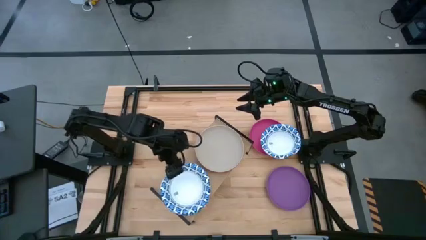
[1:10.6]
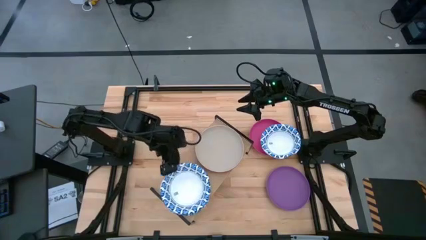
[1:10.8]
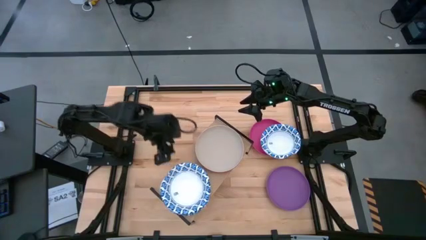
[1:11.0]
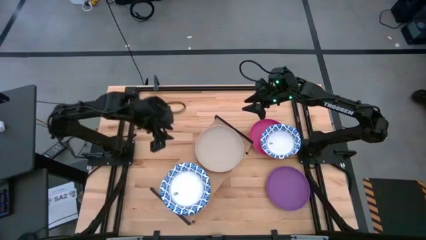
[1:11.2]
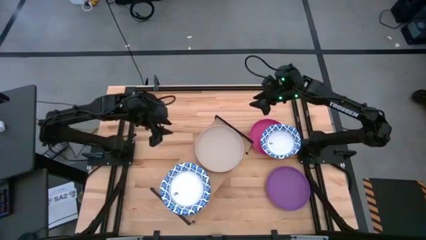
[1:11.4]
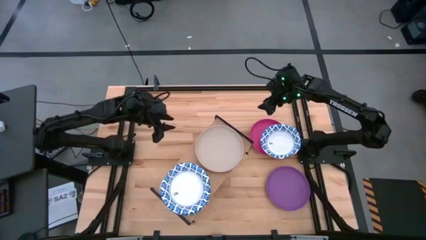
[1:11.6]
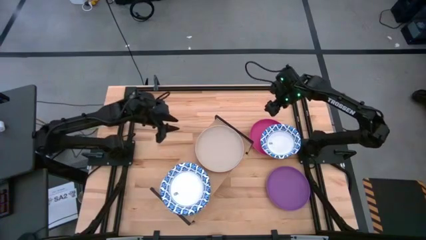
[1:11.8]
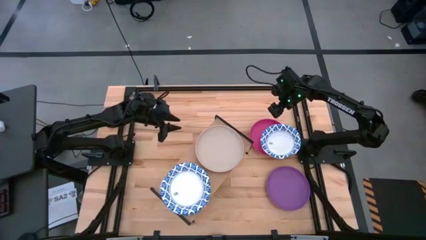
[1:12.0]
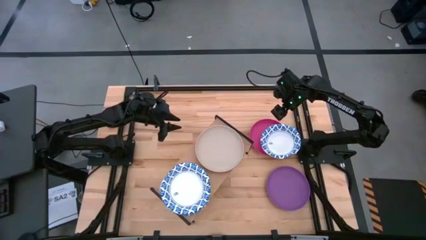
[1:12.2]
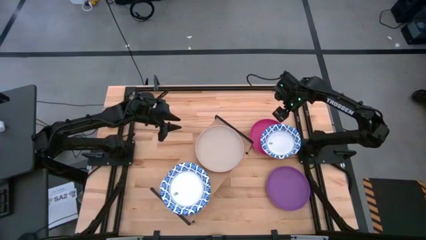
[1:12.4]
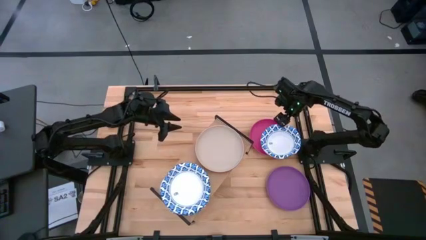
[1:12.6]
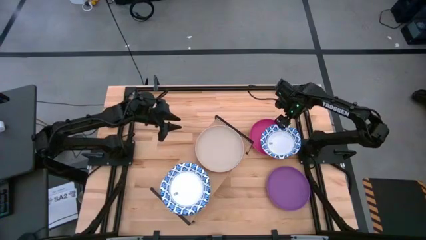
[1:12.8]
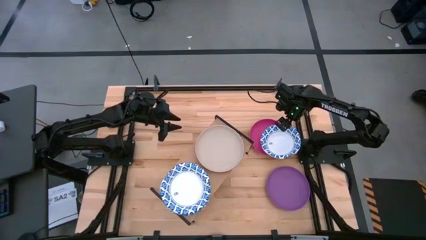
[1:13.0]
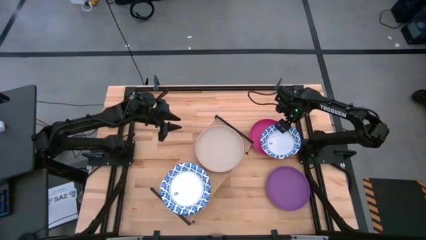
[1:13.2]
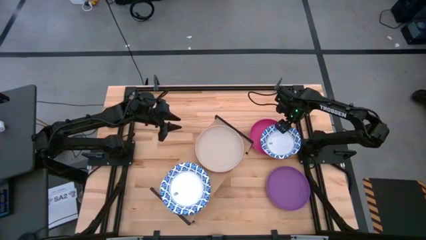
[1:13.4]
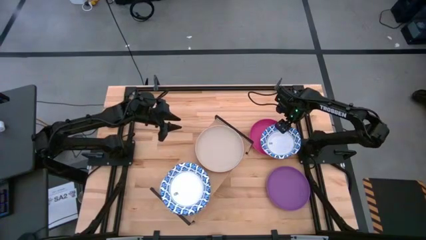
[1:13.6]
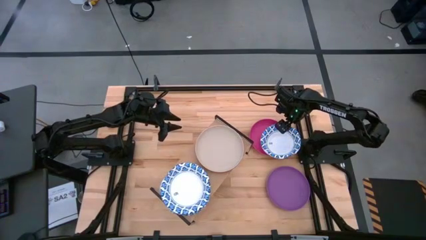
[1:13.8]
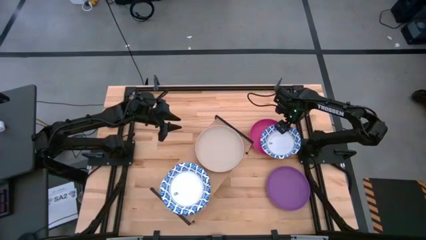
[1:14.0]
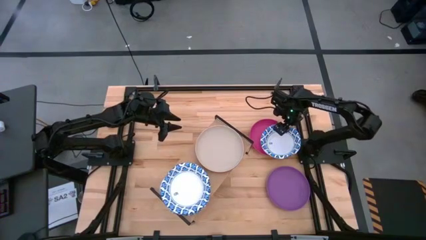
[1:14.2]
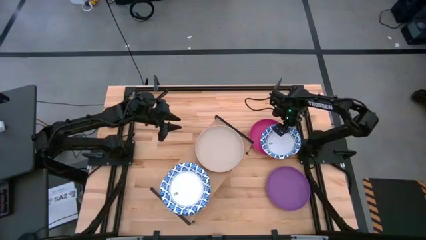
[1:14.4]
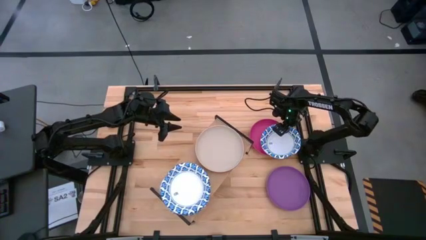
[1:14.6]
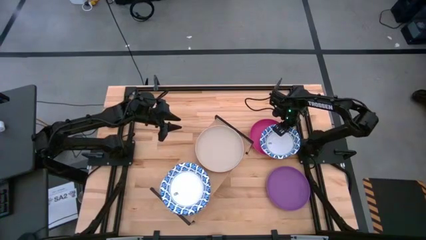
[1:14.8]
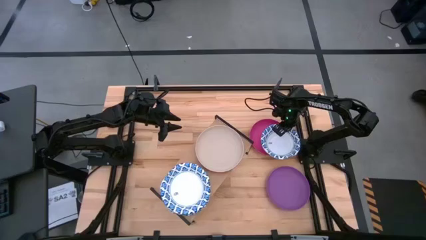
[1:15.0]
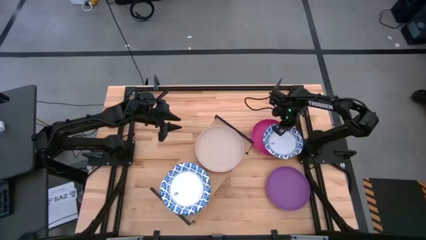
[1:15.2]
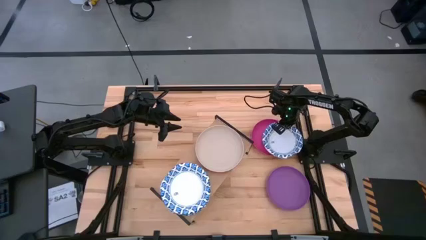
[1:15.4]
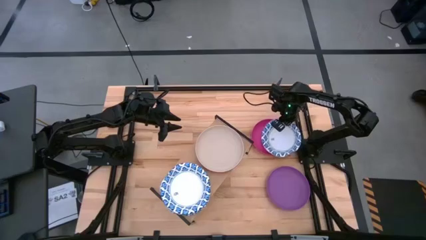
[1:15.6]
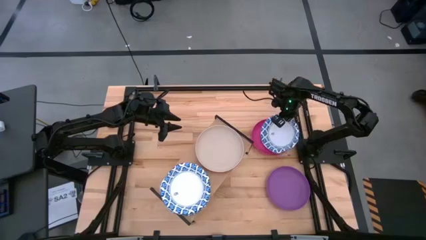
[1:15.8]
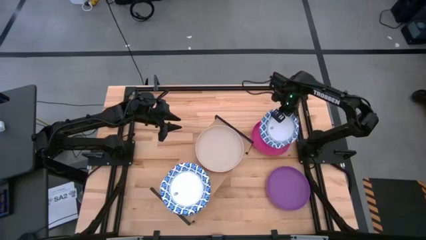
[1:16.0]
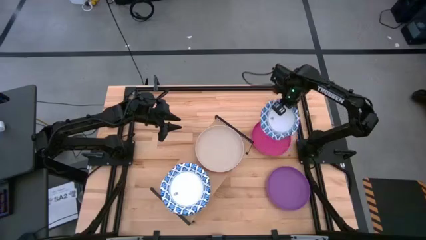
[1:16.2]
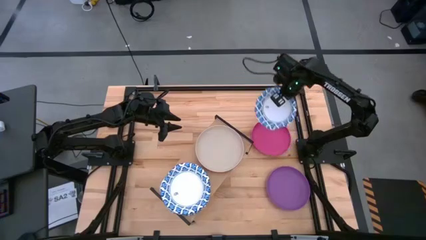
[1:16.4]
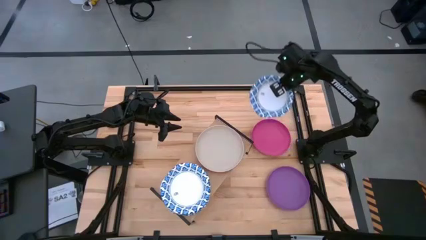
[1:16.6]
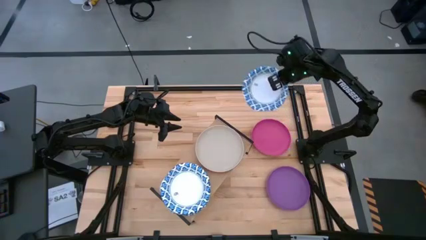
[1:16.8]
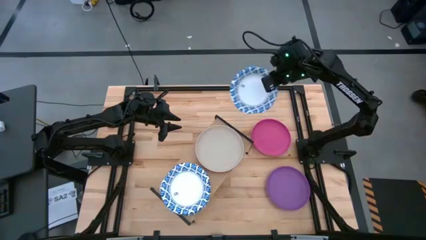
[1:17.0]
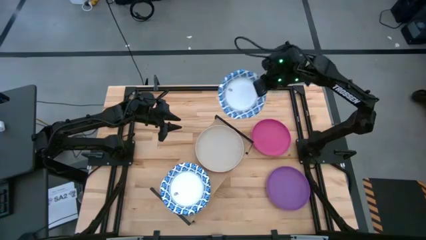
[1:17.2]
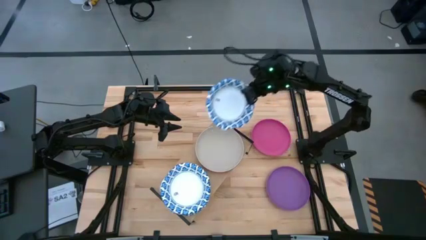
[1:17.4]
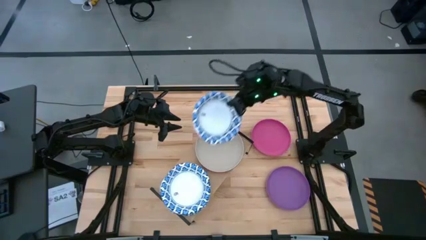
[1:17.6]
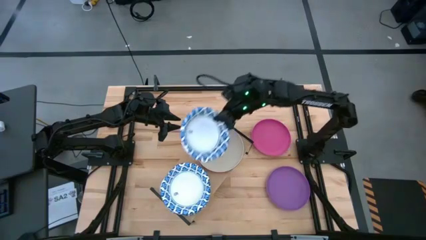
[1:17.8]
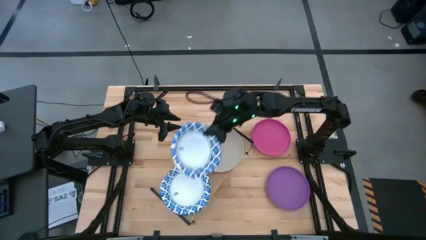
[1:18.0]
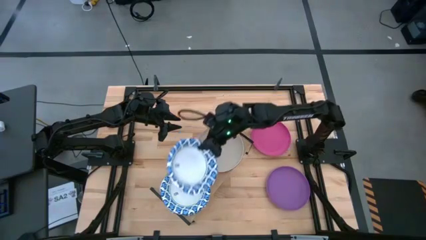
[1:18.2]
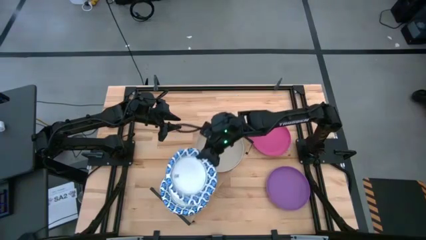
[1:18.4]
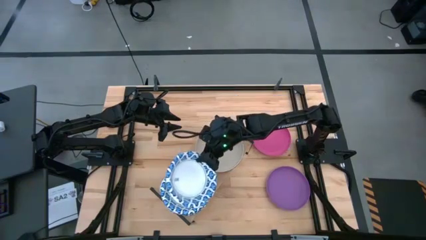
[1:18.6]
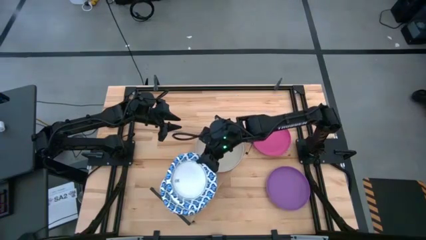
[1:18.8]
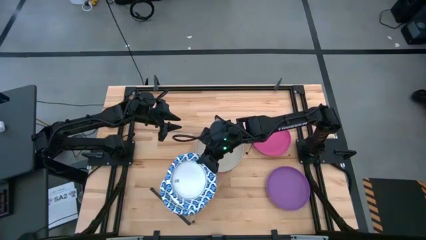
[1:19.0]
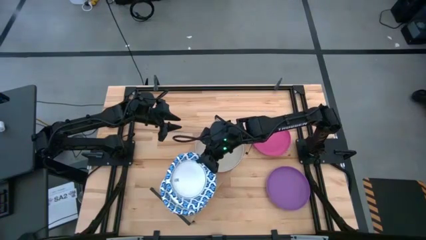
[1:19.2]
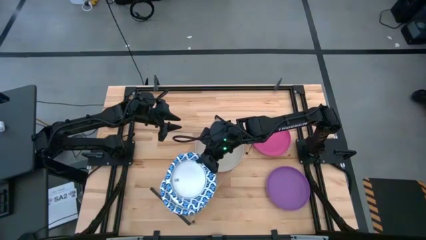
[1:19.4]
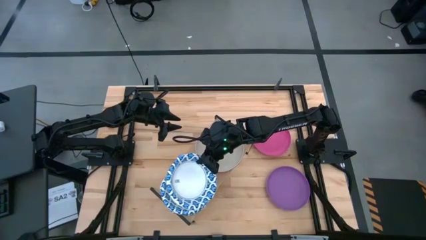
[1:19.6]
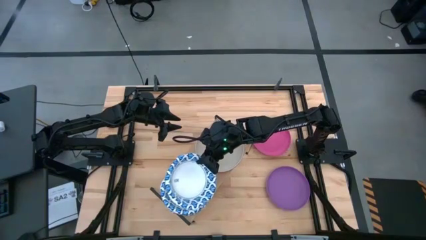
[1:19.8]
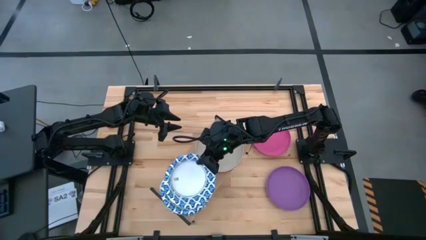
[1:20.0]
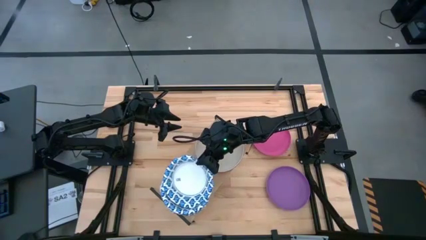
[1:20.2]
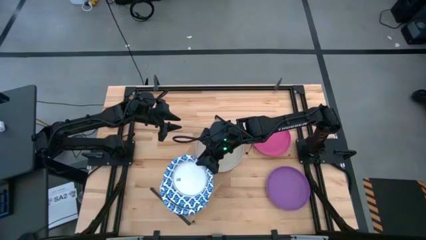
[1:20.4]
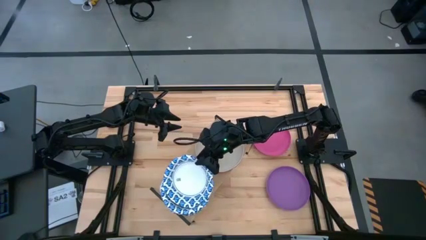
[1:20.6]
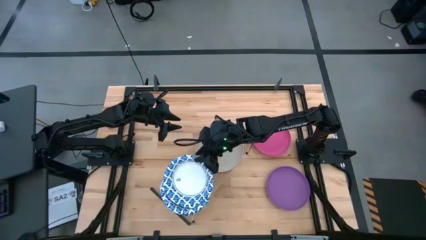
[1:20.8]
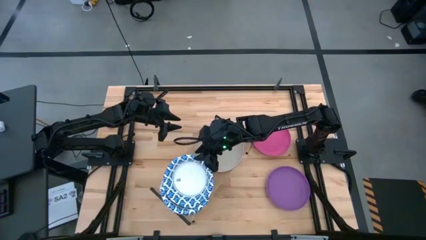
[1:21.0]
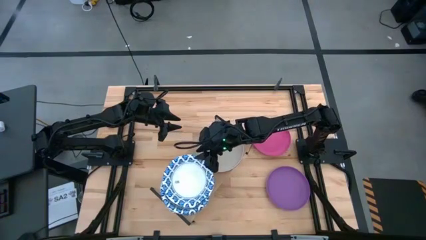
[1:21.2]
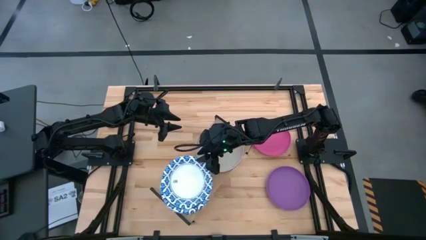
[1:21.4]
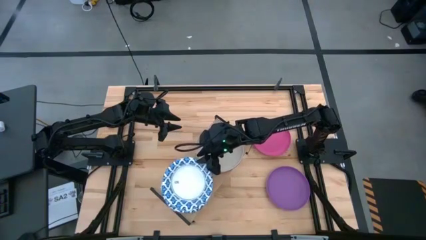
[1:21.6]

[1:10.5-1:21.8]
Task: Place and stack plates onto a shelf
Stack the white blue patterned plate on top of the white blue patterned plate on the shelf

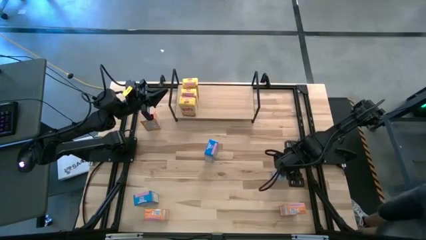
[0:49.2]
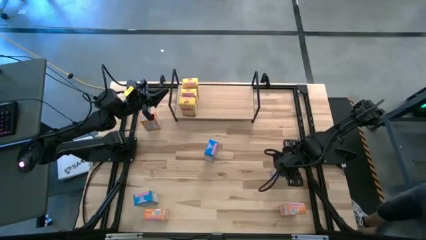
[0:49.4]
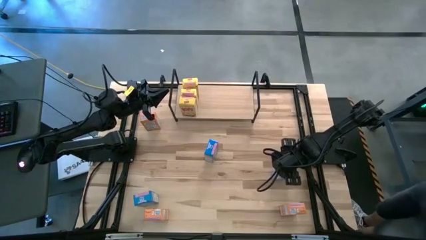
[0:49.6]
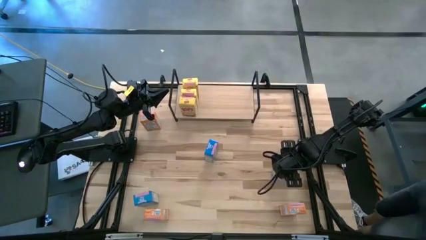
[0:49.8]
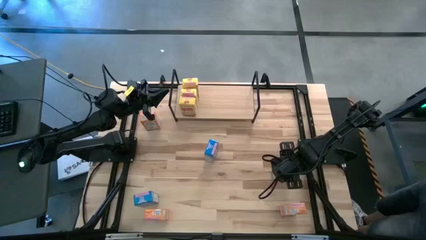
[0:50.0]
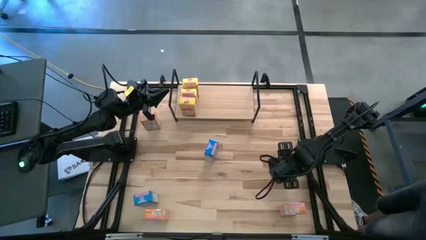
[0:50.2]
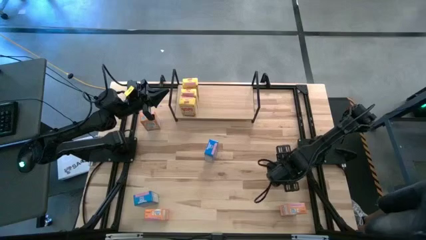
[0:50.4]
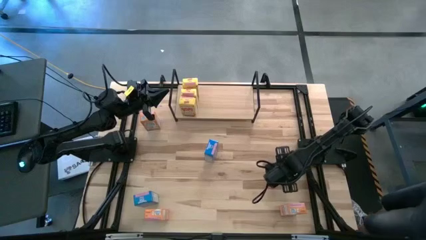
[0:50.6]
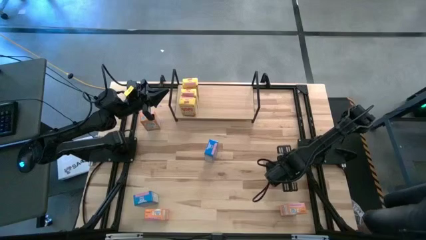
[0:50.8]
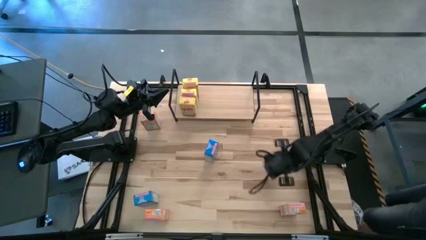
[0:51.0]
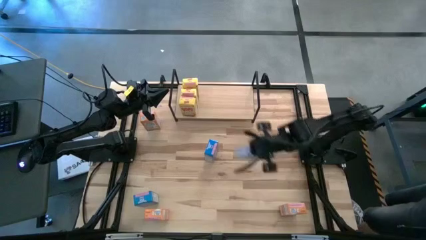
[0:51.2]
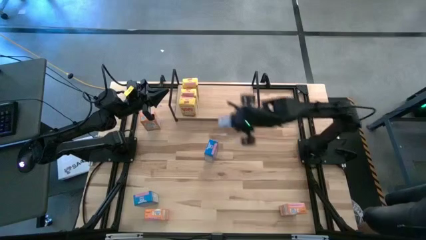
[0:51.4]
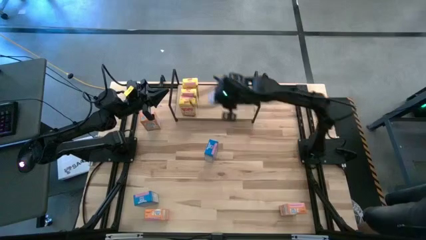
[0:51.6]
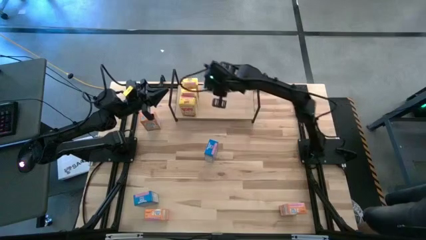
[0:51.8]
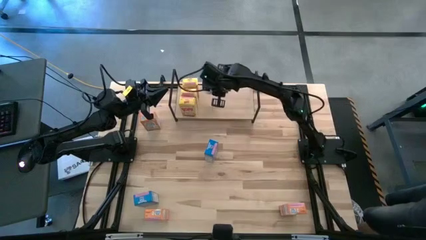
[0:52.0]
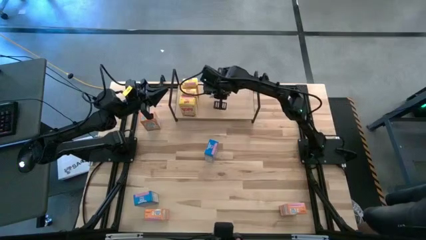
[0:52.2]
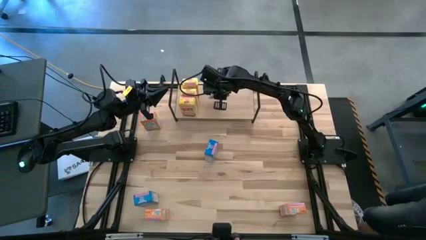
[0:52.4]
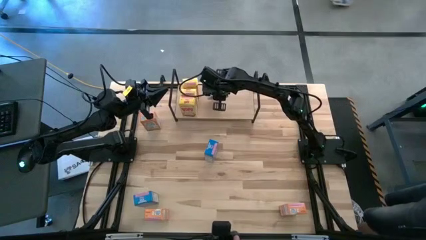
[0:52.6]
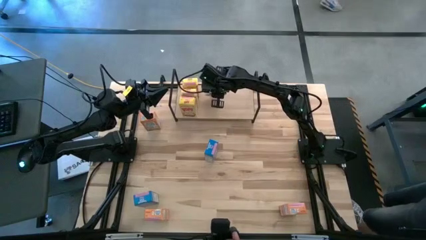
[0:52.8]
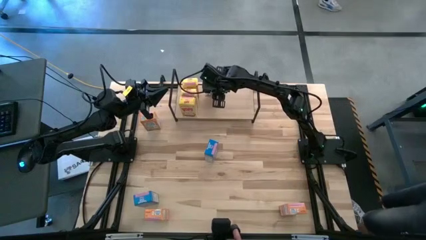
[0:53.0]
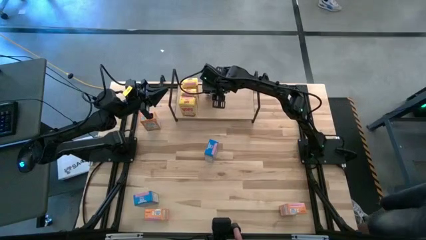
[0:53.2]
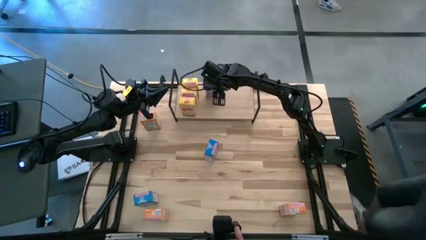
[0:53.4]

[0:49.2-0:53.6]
Task: Stack cereal on shelf
Put the middle right blue cereal box on the shelf
